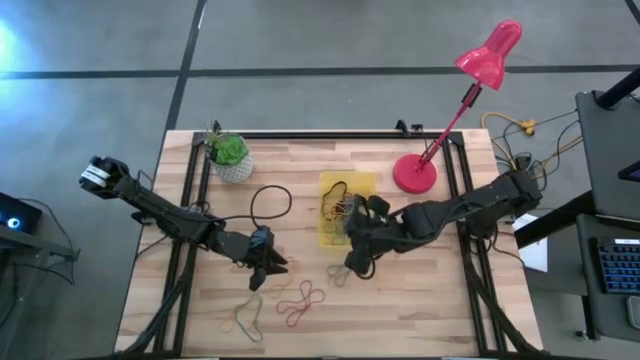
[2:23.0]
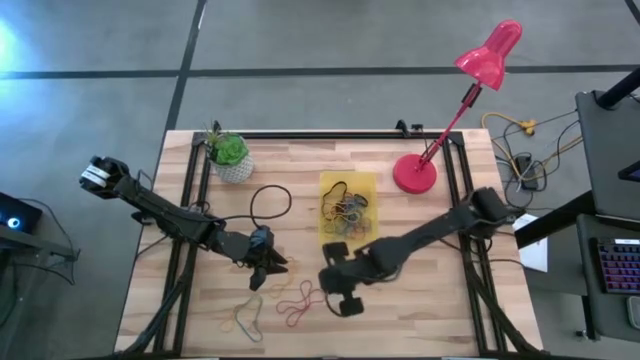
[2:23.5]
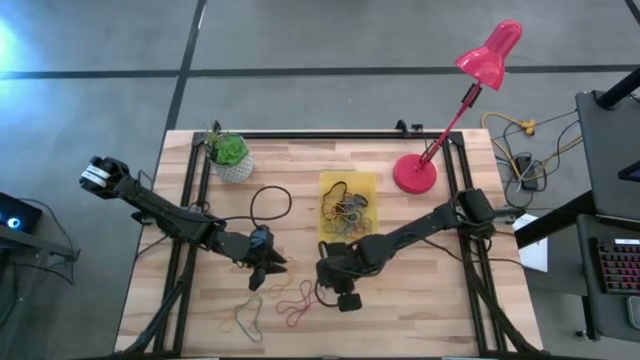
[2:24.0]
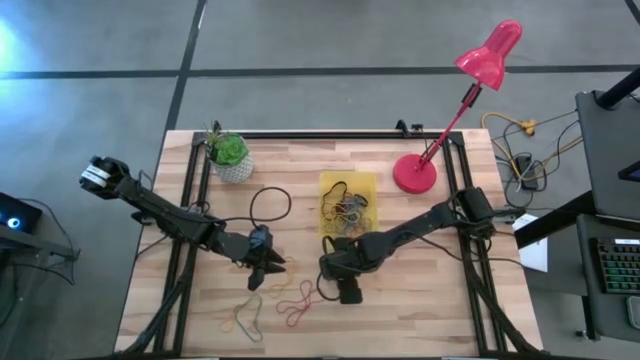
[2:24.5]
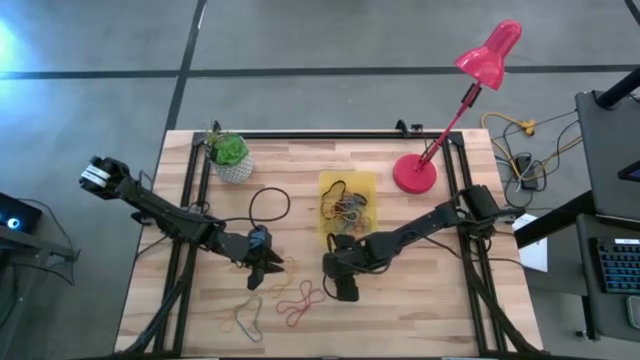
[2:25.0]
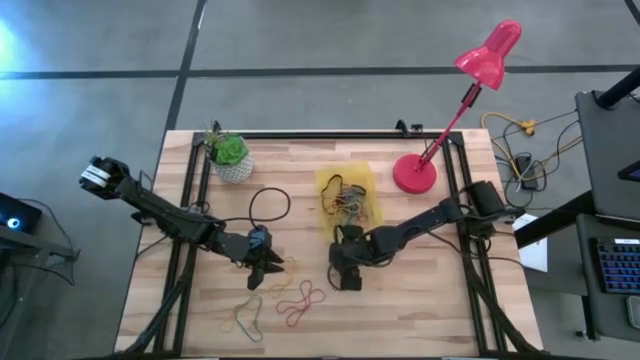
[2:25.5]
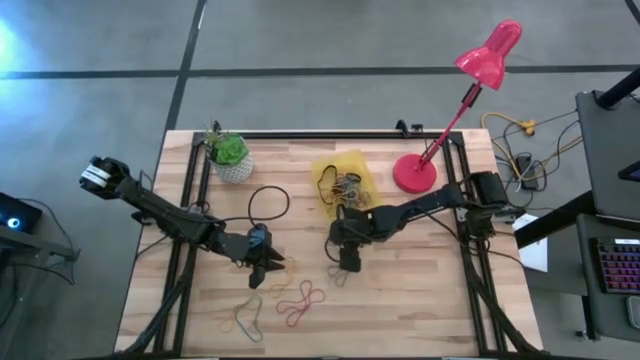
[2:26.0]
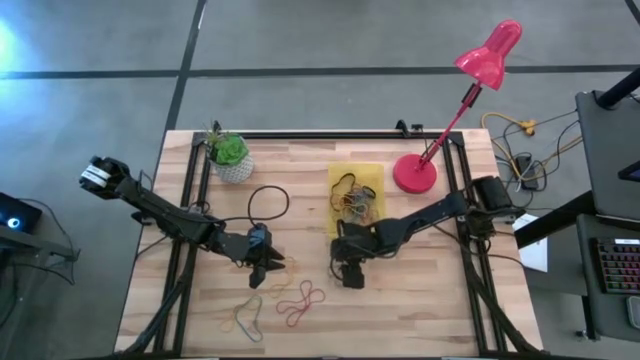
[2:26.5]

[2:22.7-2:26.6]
Task: Pick and place rubber bands into bin
Adjust the bin on the table

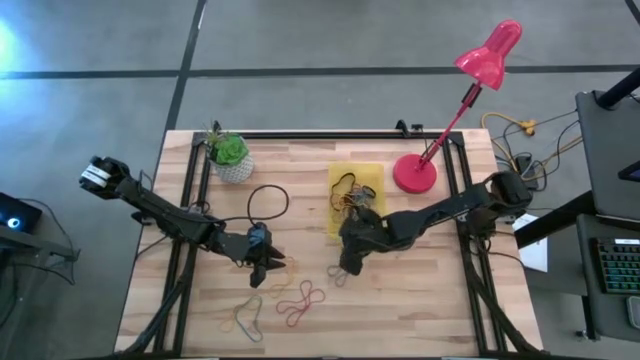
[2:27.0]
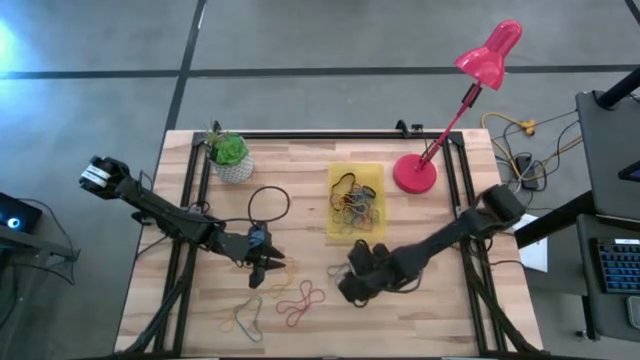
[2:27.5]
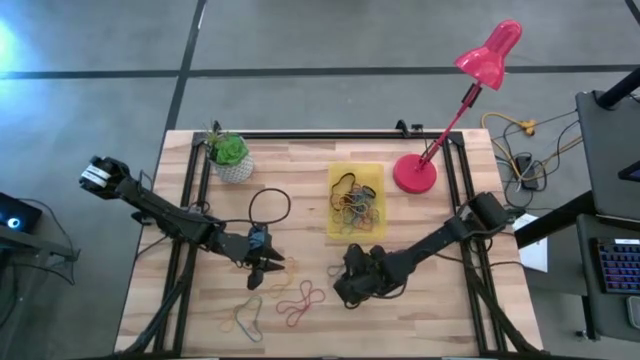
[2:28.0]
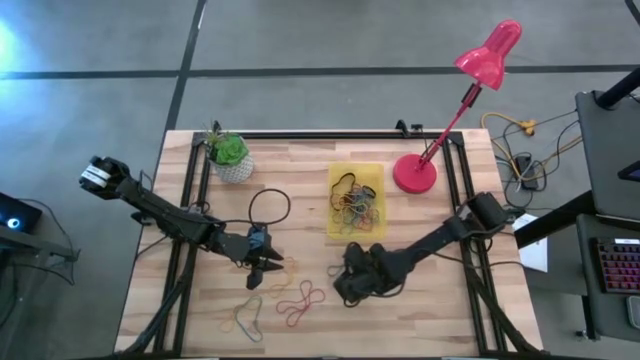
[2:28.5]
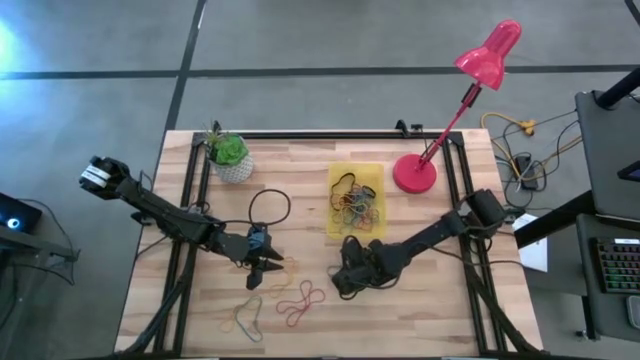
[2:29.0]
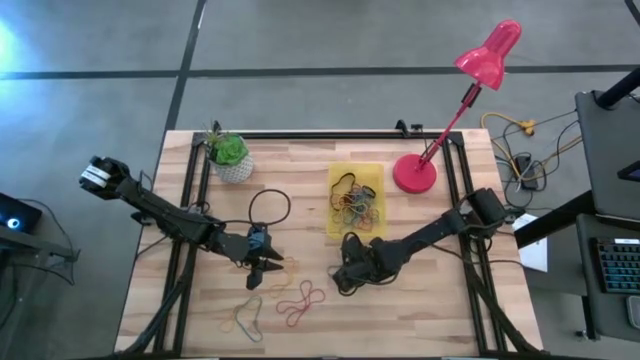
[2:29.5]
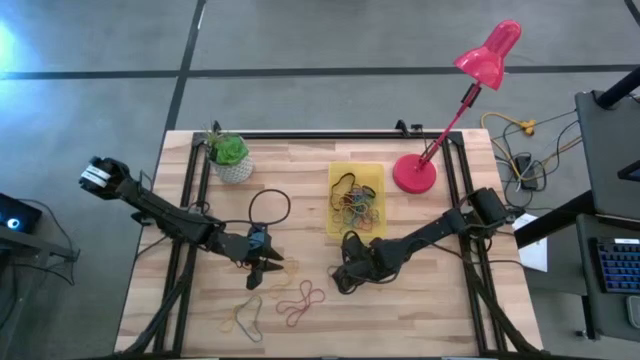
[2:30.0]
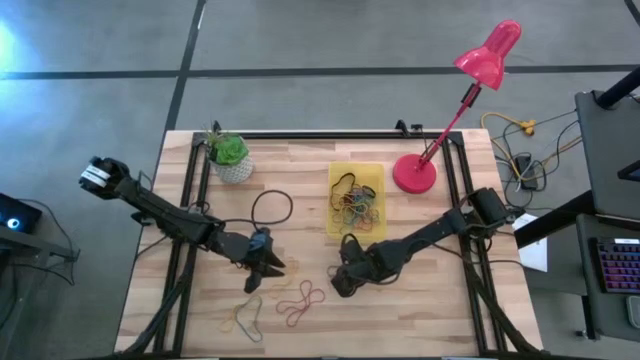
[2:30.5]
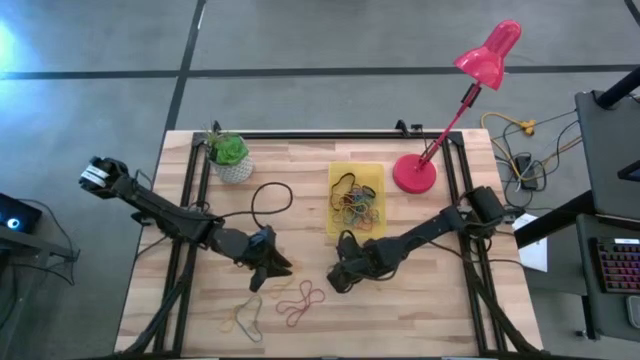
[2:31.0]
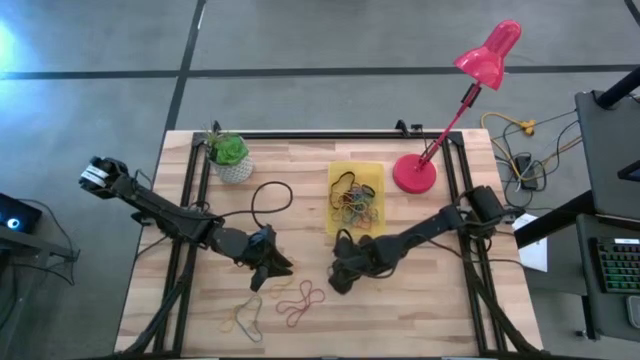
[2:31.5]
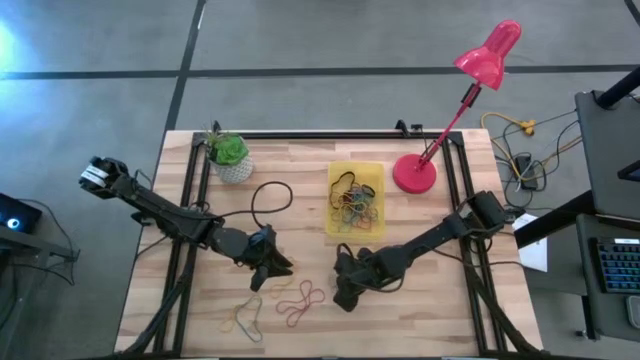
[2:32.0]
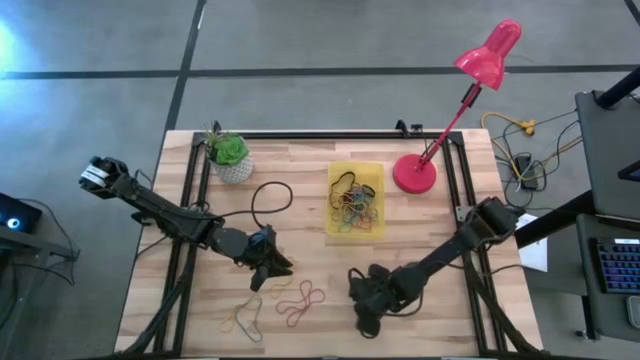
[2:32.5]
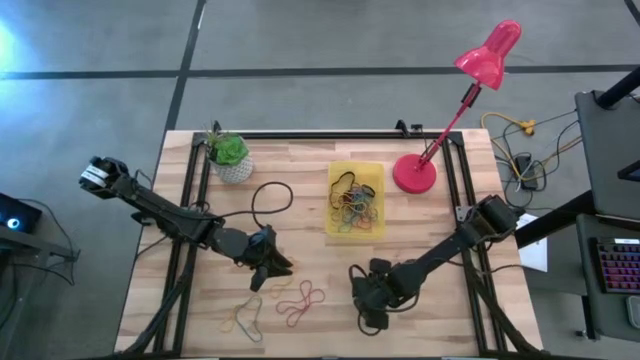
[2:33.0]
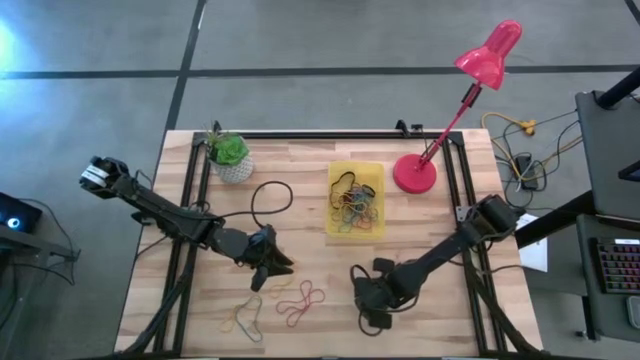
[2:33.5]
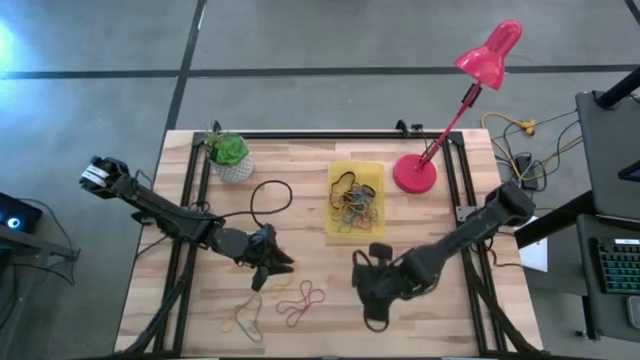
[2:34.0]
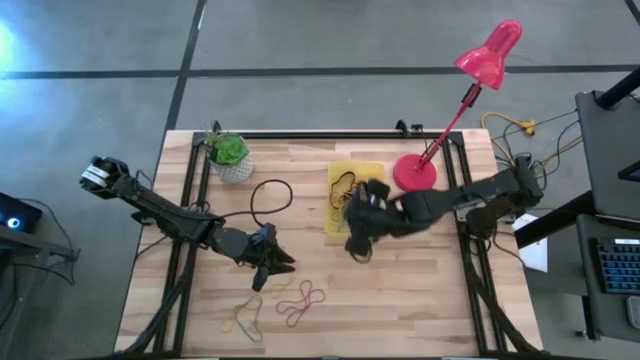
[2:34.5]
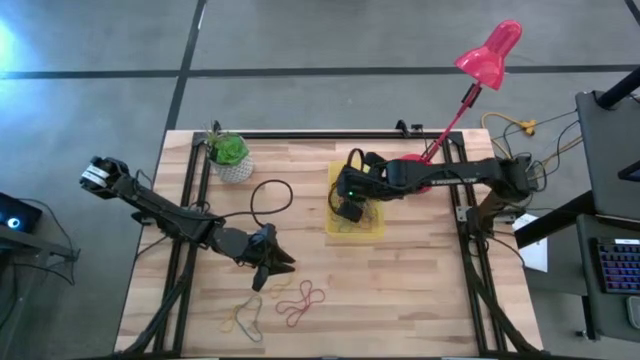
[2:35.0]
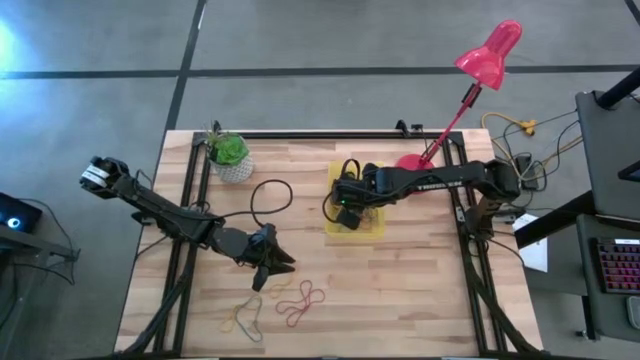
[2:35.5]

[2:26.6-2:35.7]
Put the right blue rubber band into the bin

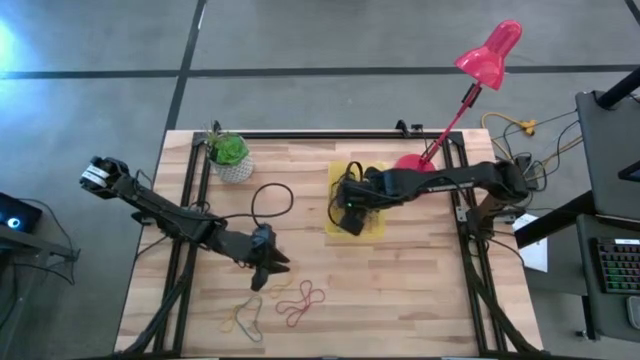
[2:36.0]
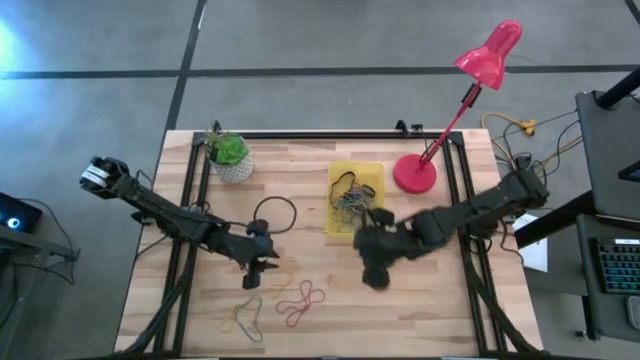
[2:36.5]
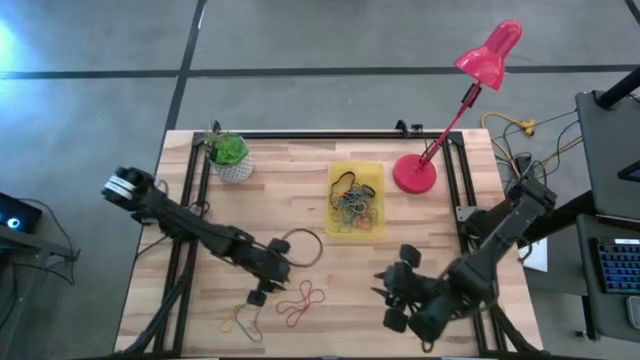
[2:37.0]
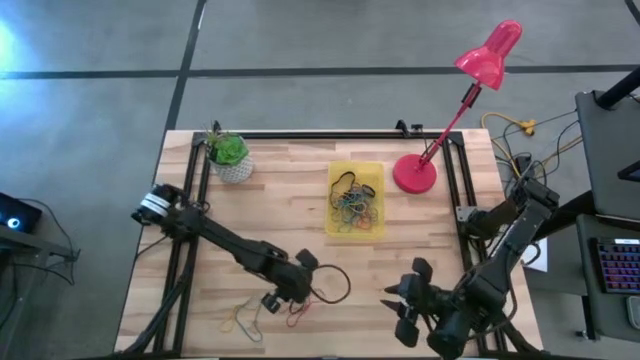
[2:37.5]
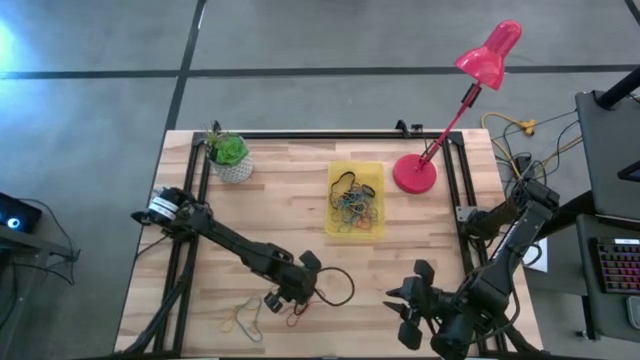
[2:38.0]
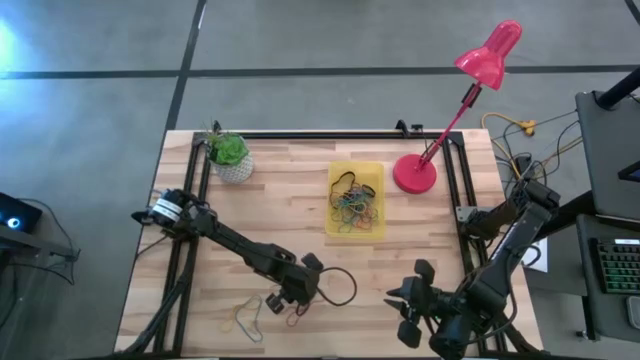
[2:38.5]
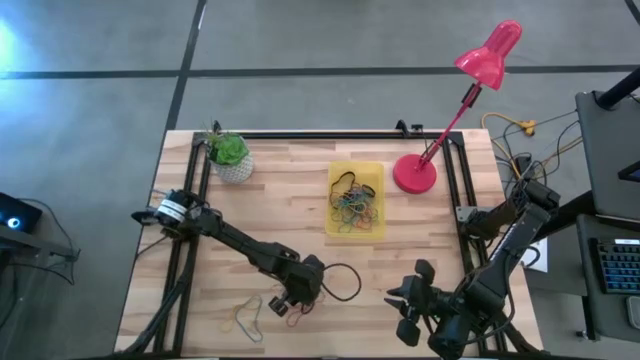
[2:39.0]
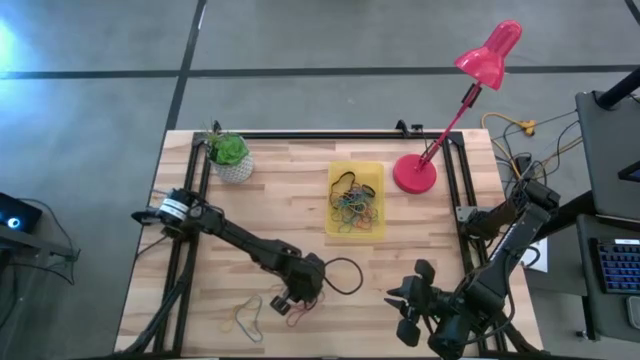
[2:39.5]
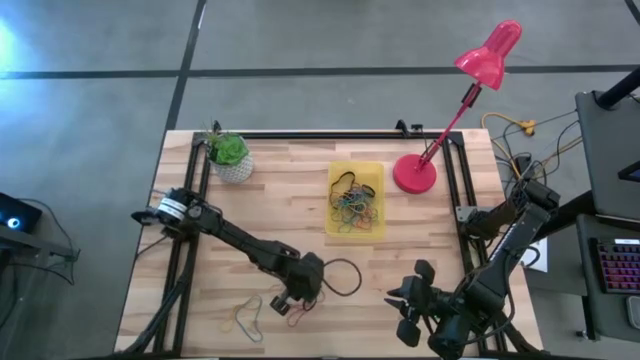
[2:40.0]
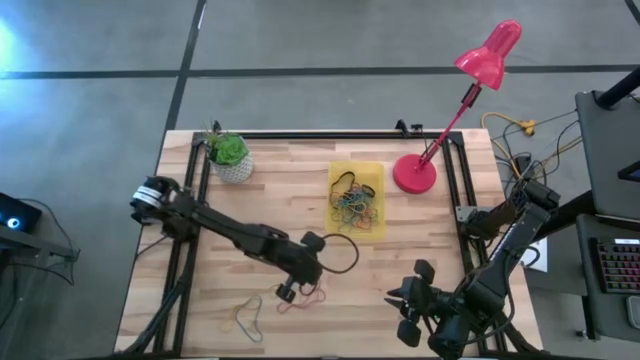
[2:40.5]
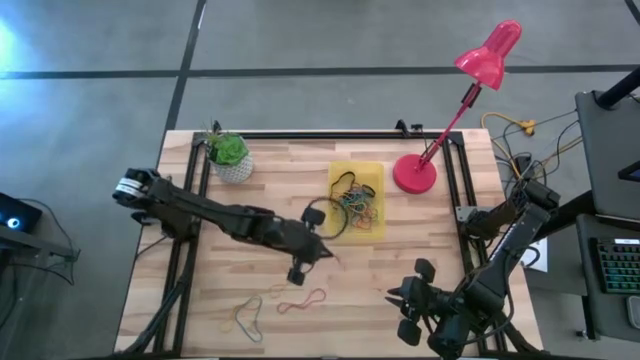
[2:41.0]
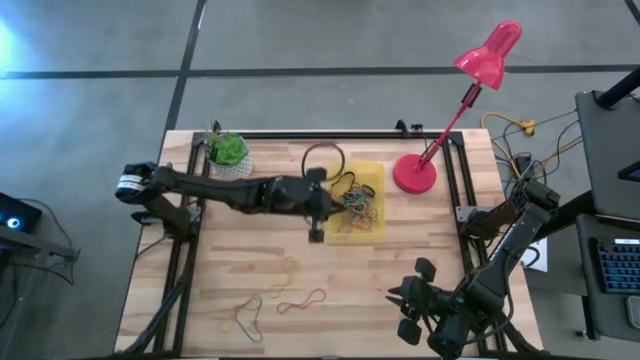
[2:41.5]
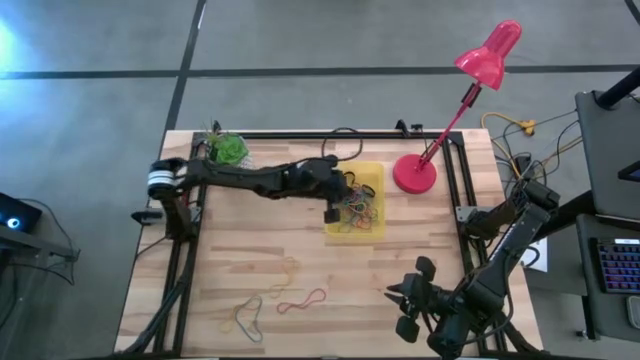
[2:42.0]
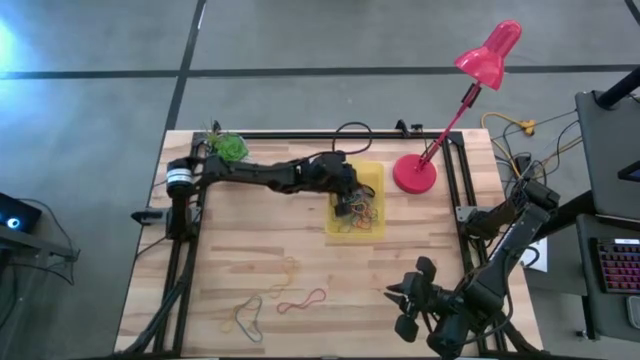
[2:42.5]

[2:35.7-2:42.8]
Put the top red rubber band into the bin
